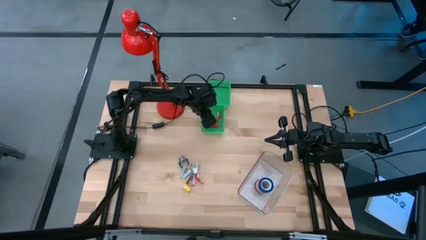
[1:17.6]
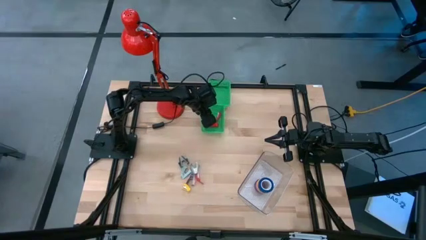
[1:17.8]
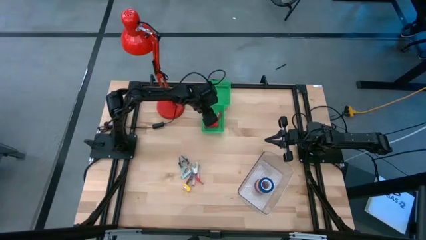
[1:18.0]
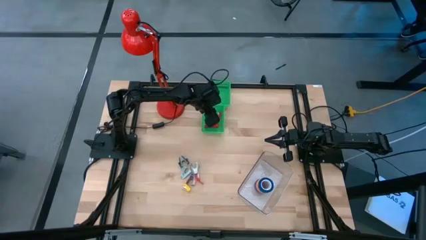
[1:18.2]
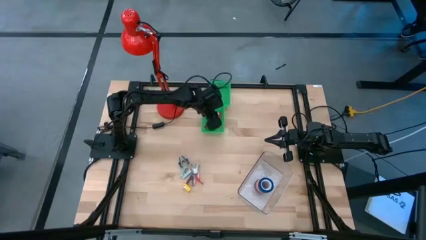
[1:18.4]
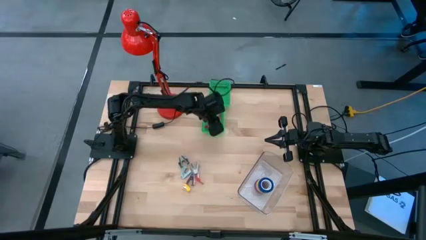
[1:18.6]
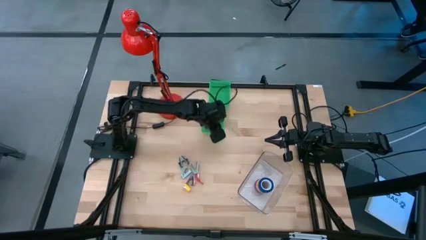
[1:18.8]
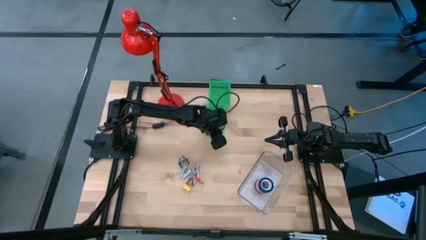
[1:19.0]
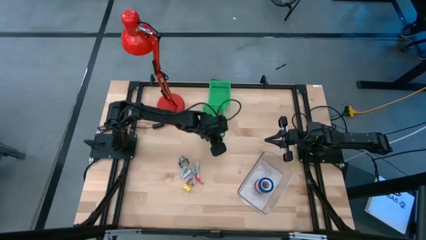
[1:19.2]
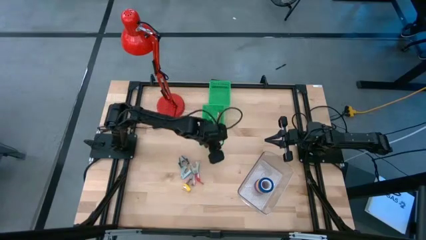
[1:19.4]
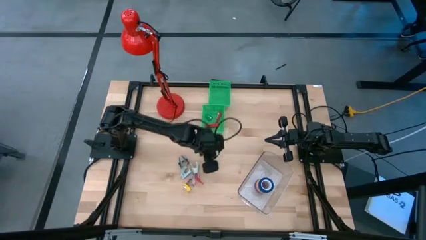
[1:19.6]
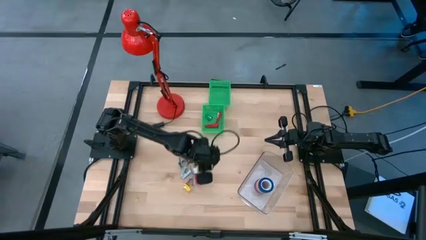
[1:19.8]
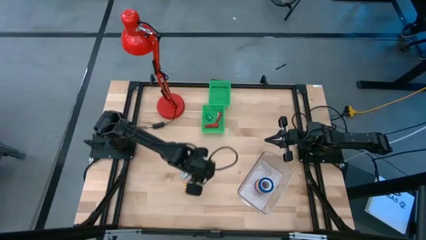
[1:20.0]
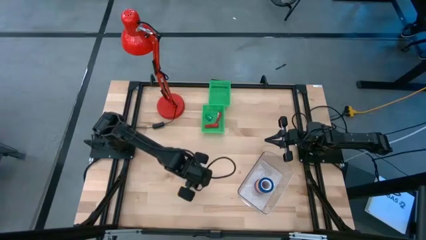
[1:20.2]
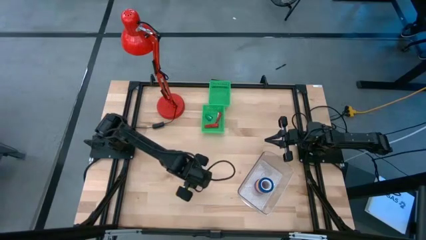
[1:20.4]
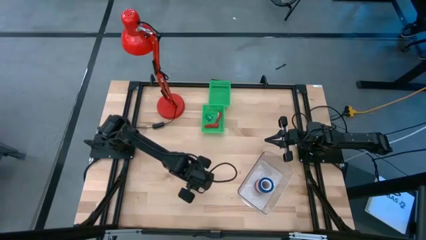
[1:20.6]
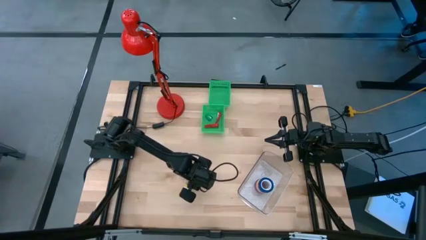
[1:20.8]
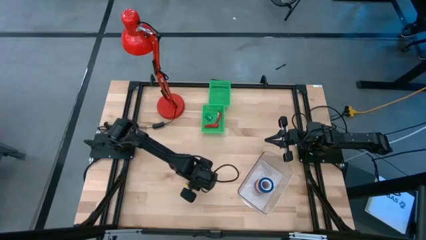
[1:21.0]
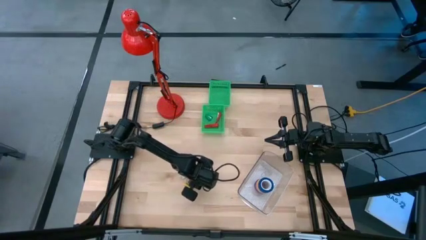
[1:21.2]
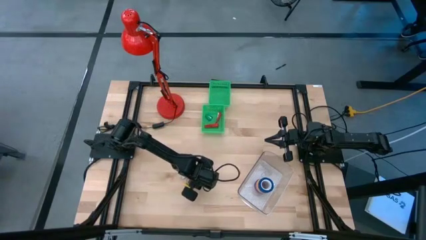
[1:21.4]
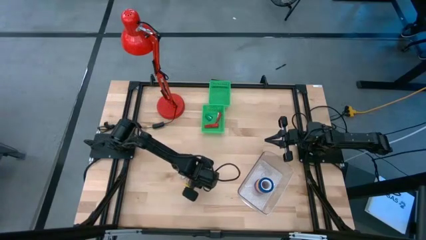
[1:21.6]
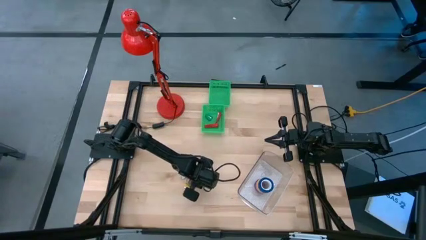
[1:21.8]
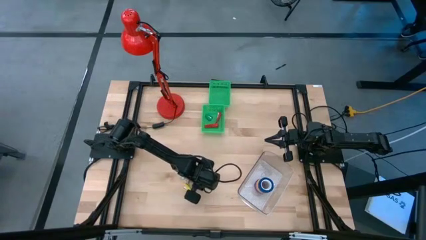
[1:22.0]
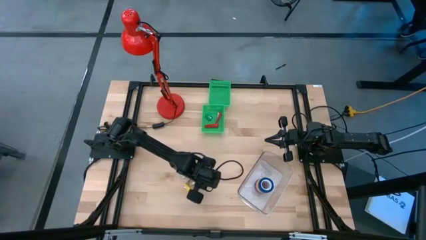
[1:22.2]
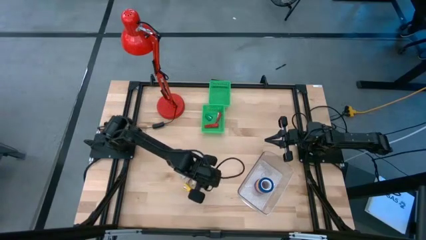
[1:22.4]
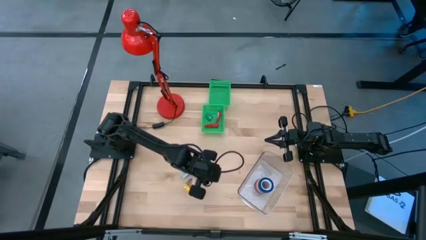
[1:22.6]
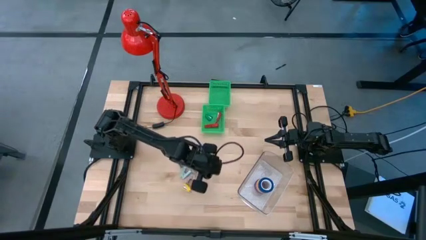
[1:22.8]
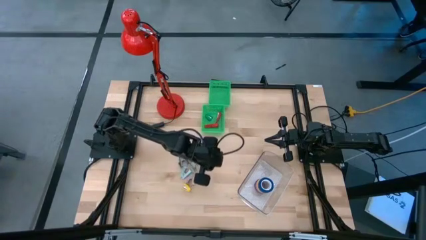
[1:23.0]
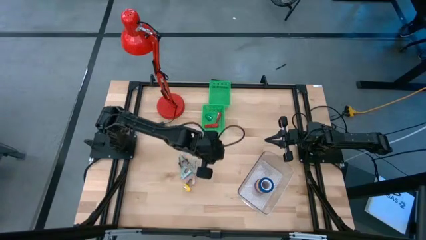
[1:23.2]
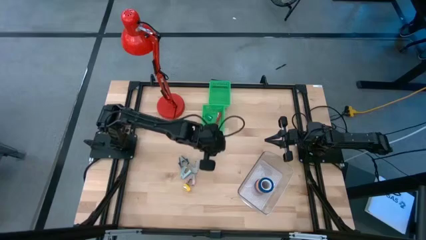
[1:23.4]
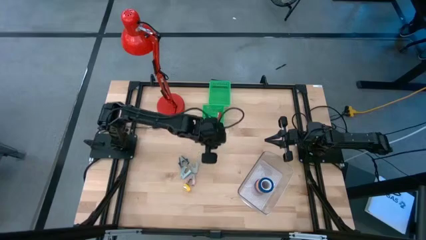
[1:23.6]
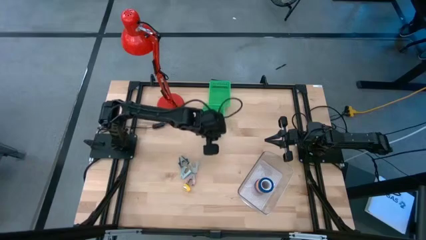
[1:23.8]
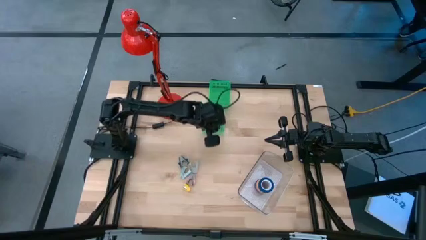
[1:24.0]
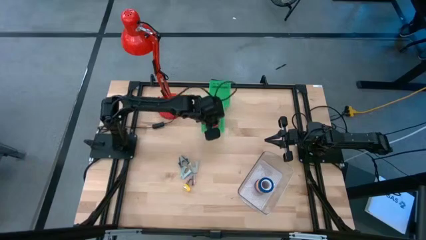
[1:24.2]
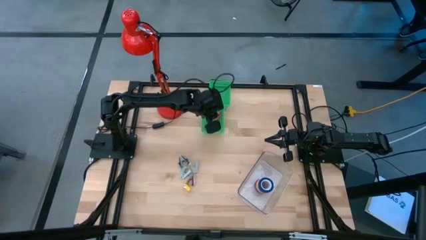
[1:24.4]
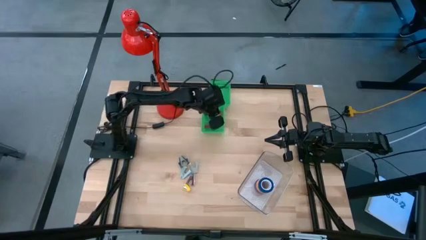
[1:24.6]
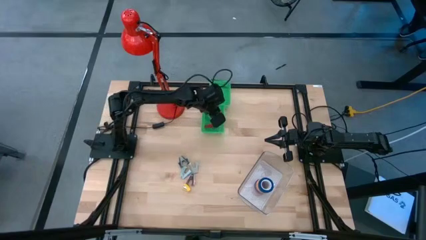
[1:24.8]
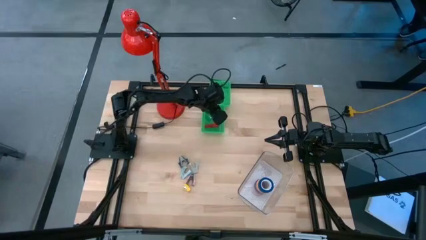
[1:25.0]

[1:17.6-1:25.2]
Task: Pick and place Stapler, Stapler remover, tape
Put the red stapler into the bottom green bin

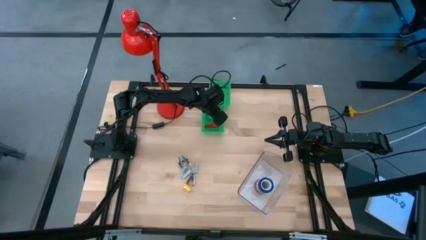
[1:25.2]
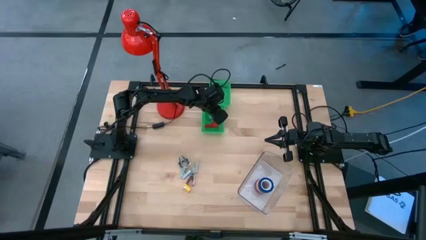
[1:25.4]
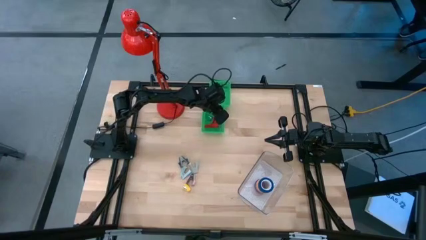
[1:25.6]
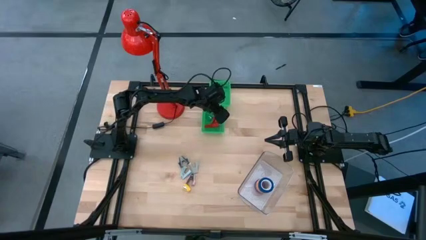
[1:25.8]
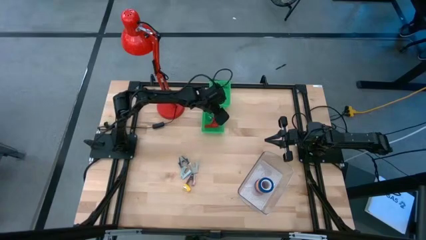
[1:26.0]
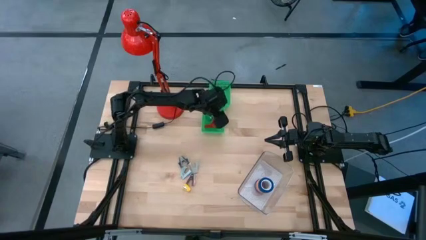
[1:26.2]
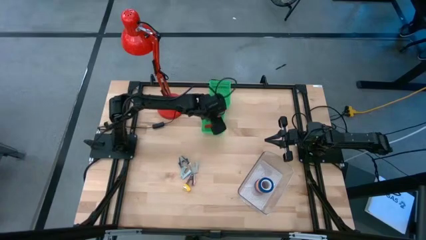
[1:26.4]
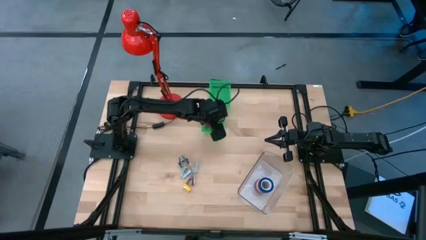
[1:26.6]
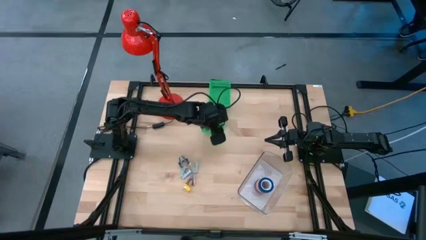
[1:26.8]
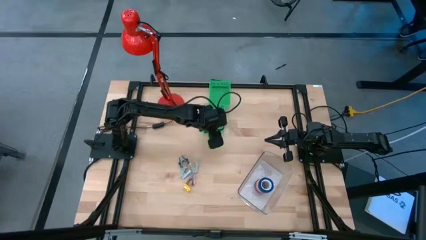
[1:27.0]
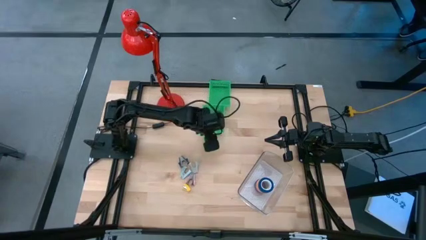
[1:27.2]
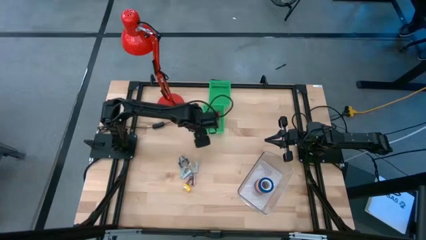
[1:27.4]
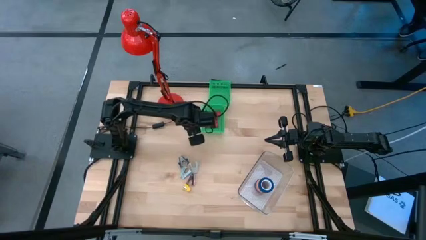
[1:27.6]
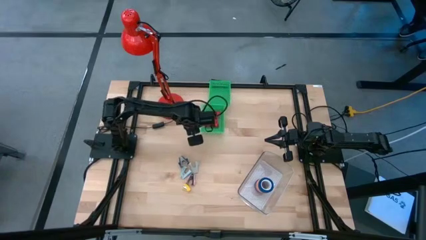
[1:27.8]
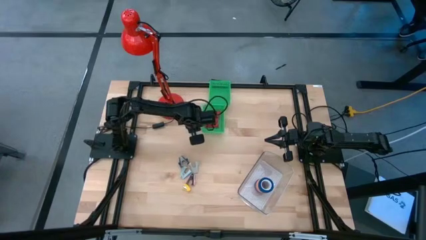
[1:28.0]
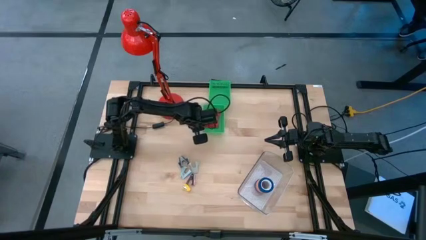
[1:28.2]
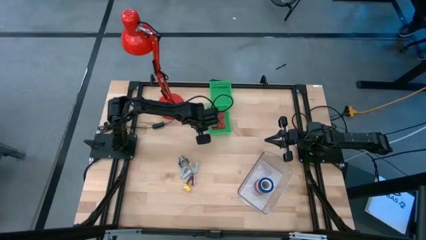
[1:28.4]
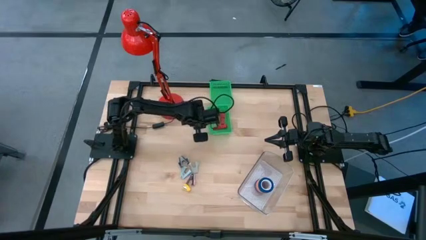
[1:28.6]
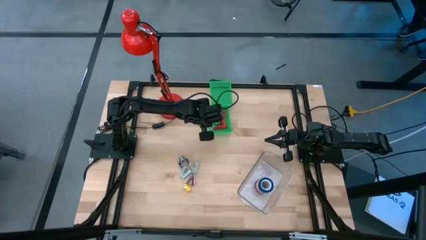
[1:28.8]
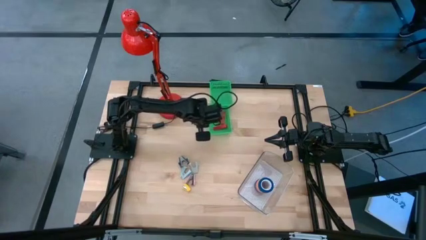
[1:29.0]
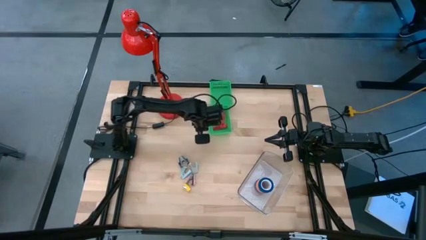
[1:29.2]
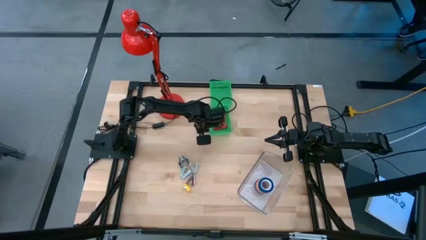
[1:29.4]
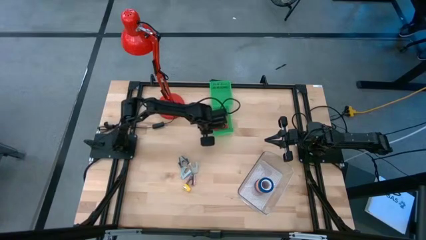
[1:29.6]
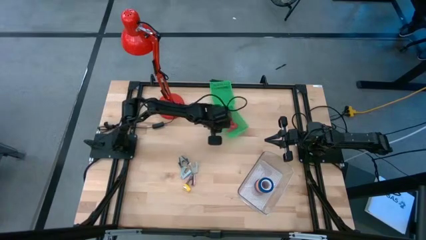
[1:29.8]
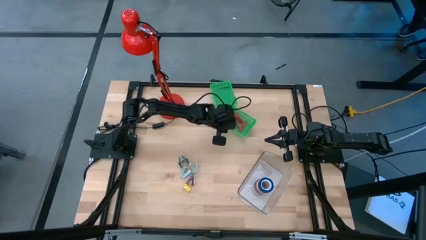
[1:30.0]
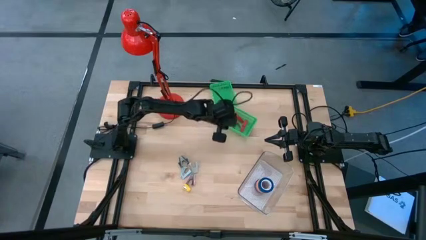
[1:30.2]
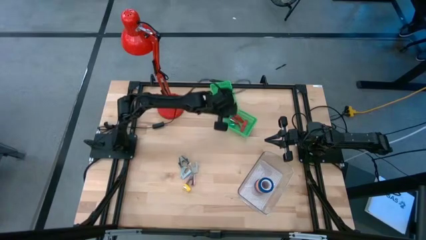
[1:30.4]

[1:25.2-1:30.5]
Adjust the bottom green bin

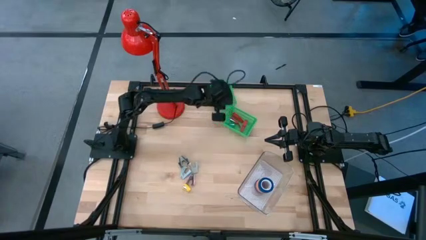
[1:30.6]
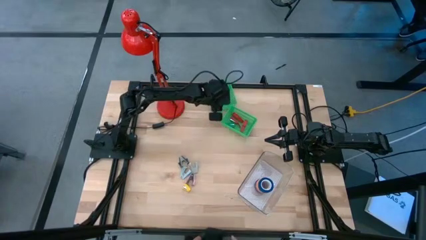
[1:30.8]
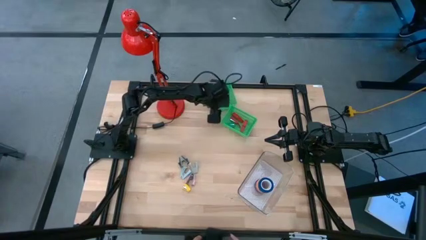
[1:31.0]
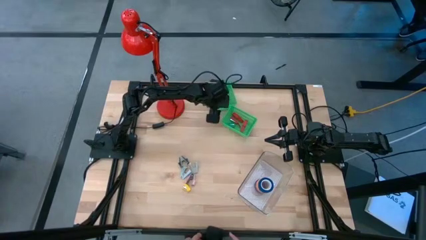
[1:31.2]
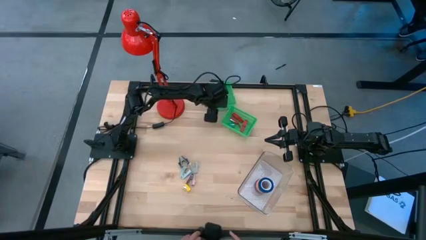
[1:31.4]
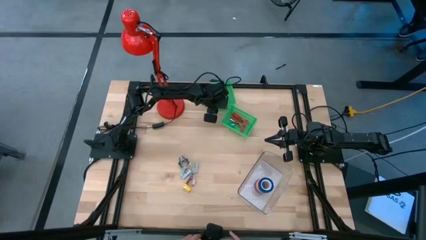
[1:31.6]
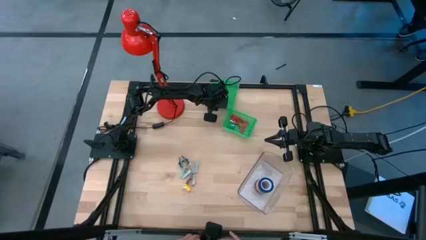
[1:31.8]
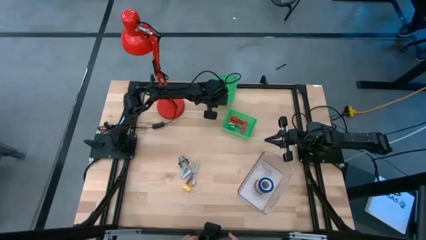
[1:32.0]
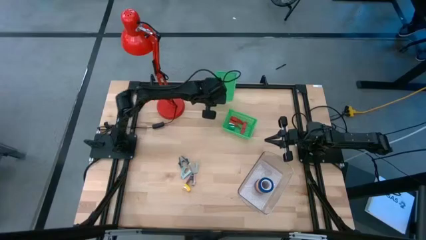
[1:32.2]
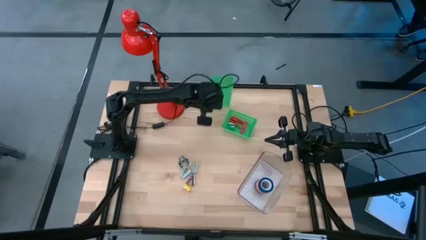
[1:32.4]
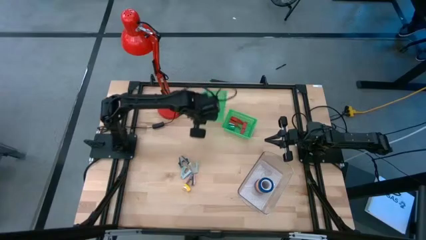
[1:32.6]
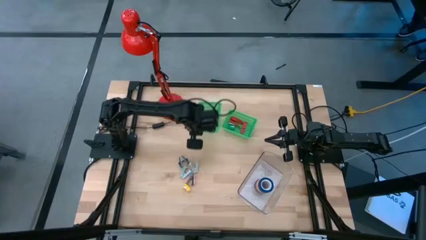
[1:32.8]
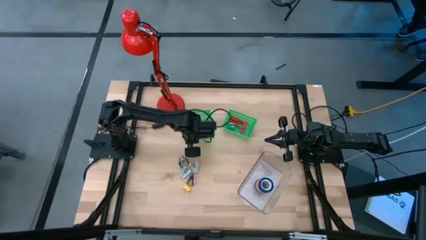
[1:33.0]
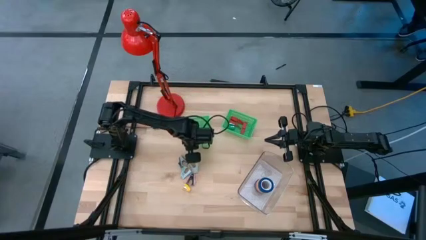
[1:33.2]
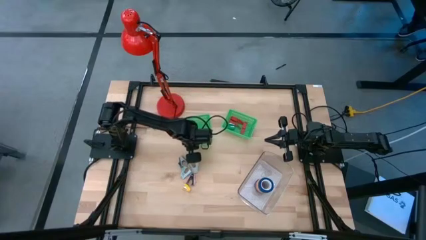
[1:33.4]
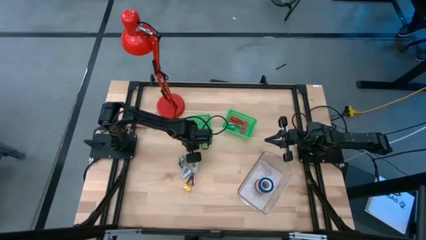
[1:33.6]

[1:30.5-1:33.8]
Move the top green bin to the center of the table
